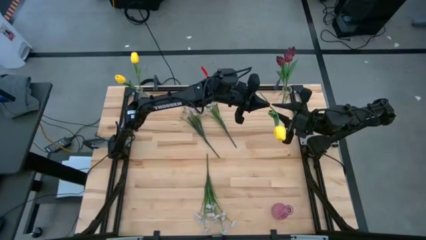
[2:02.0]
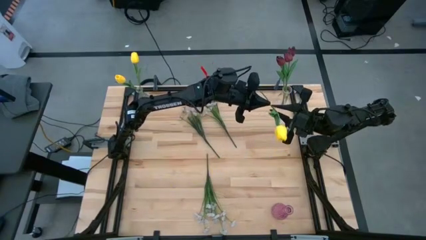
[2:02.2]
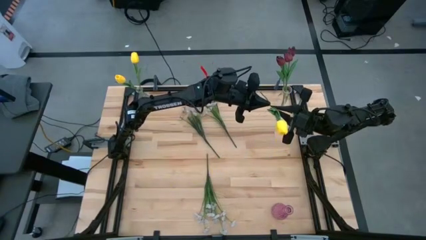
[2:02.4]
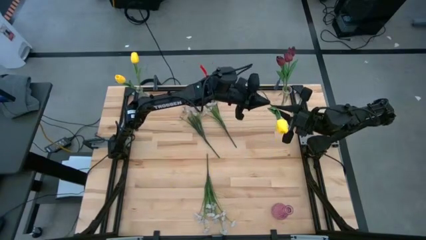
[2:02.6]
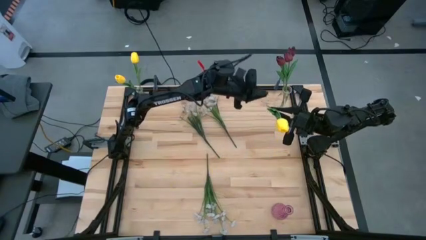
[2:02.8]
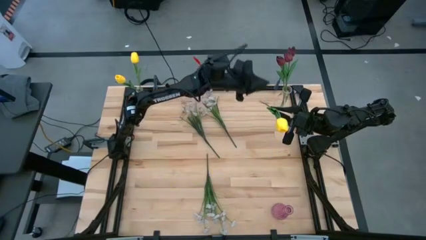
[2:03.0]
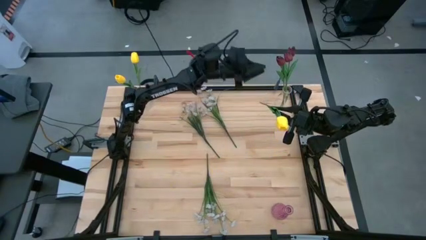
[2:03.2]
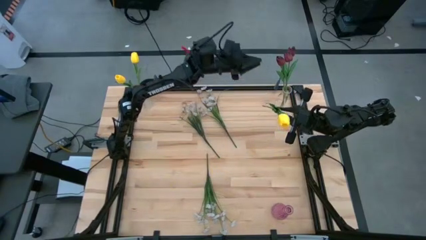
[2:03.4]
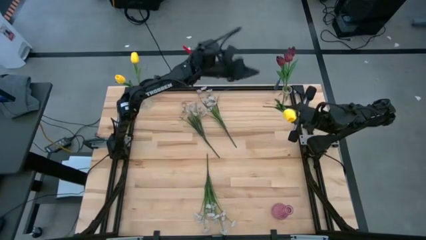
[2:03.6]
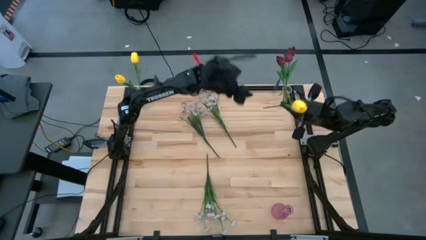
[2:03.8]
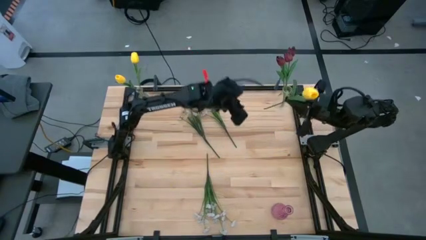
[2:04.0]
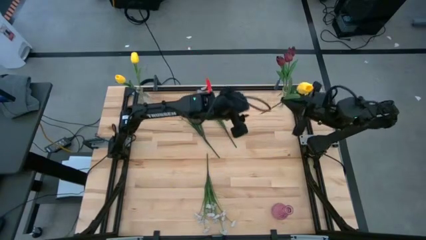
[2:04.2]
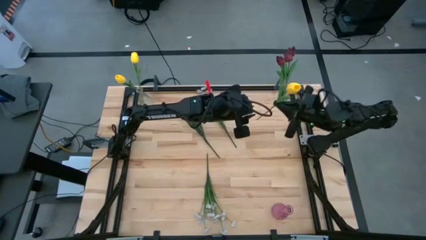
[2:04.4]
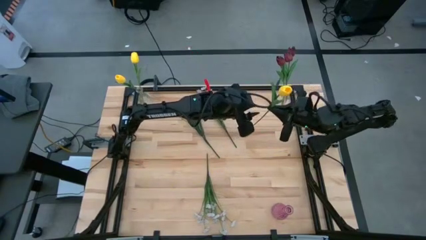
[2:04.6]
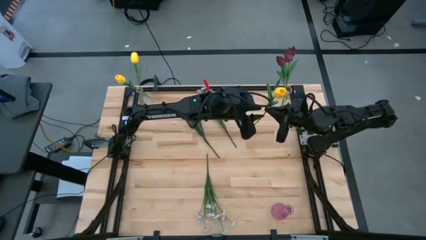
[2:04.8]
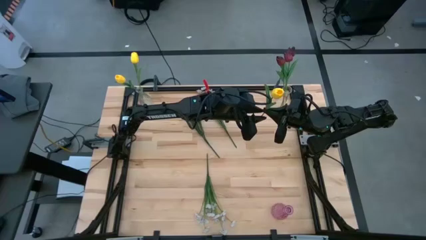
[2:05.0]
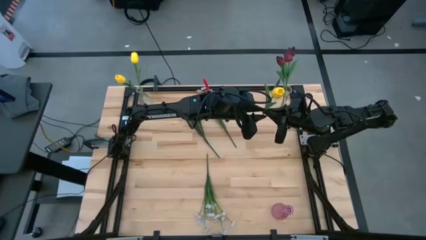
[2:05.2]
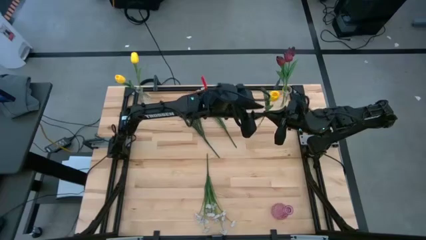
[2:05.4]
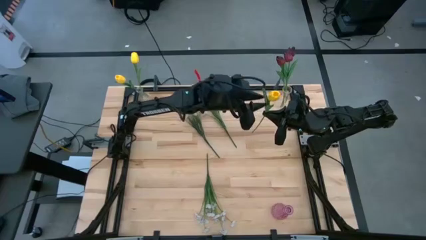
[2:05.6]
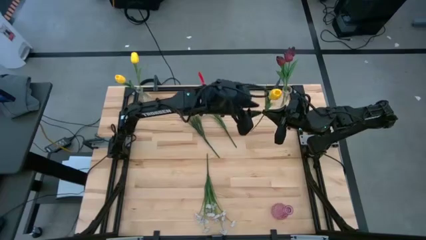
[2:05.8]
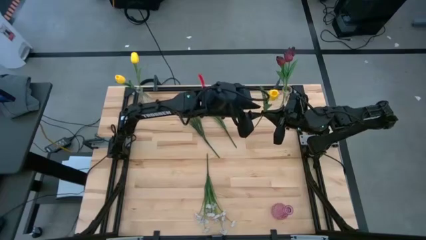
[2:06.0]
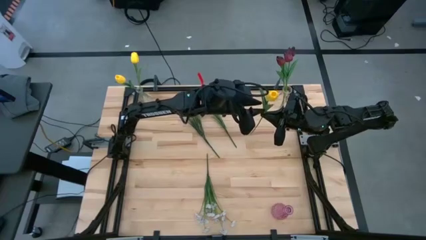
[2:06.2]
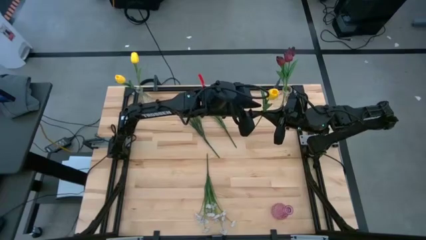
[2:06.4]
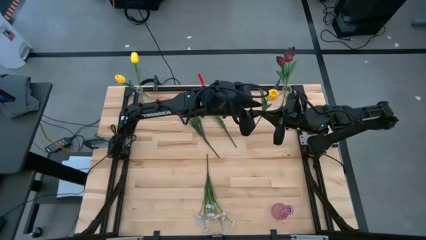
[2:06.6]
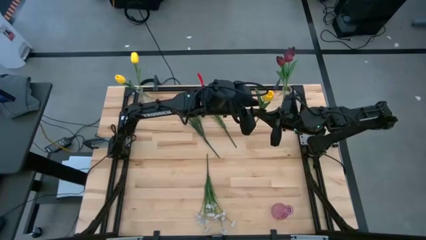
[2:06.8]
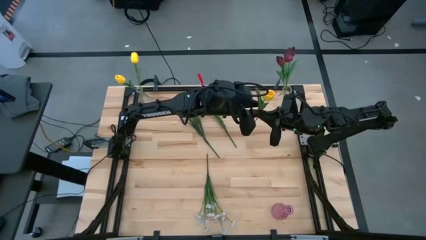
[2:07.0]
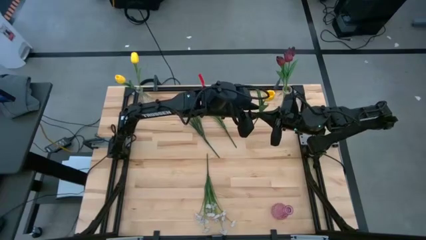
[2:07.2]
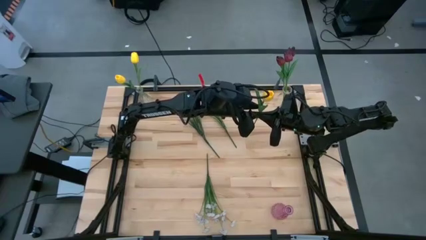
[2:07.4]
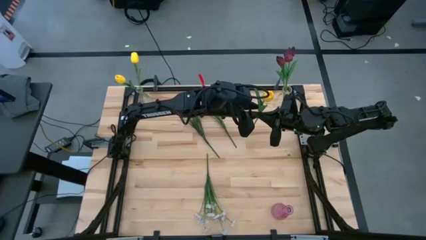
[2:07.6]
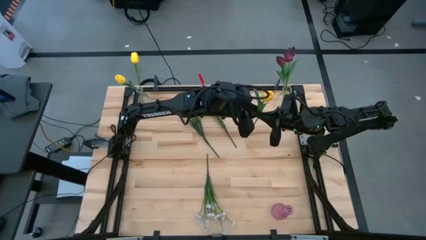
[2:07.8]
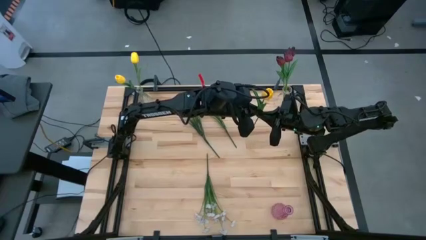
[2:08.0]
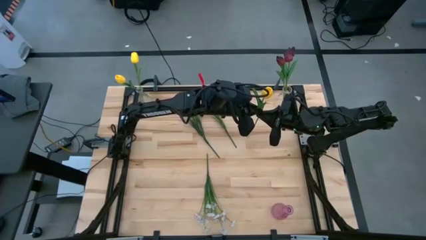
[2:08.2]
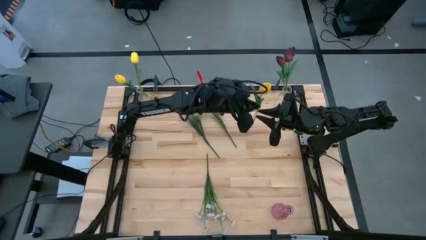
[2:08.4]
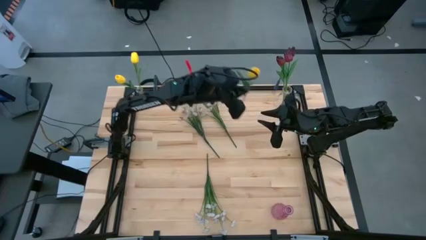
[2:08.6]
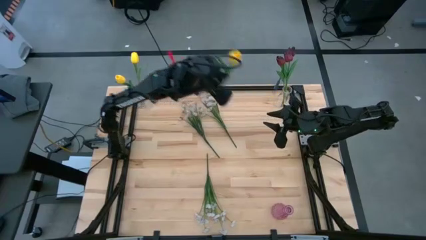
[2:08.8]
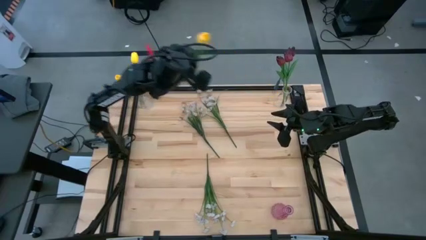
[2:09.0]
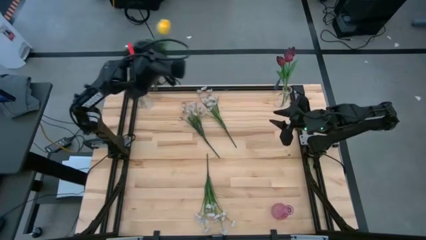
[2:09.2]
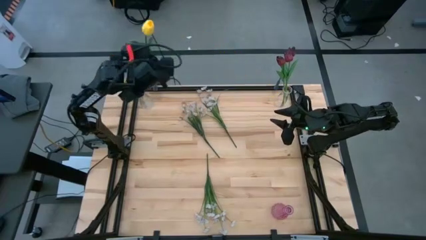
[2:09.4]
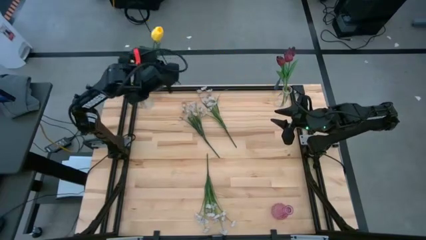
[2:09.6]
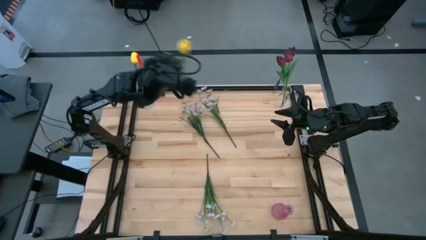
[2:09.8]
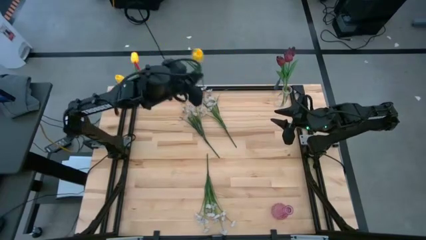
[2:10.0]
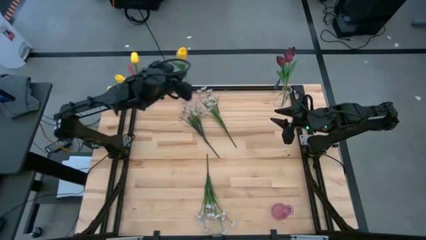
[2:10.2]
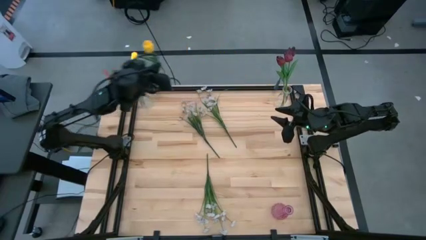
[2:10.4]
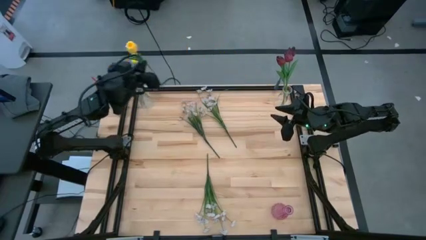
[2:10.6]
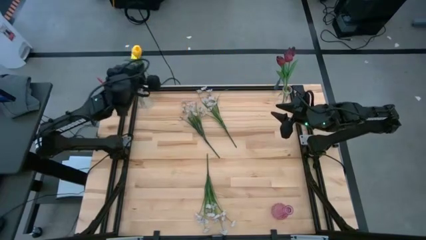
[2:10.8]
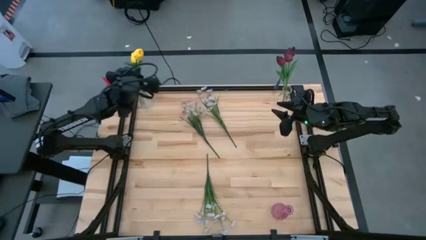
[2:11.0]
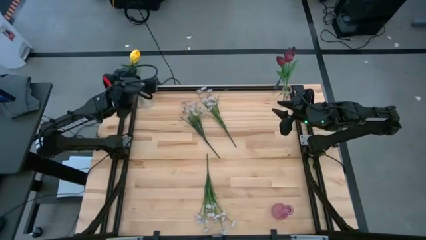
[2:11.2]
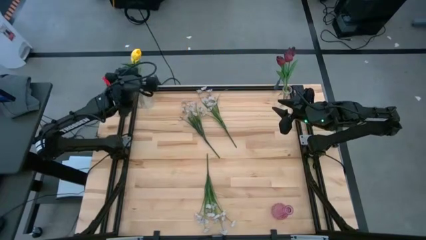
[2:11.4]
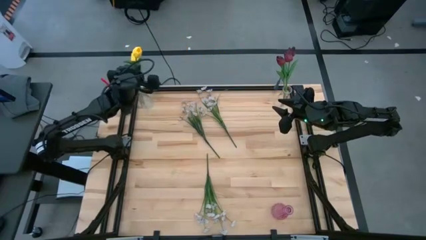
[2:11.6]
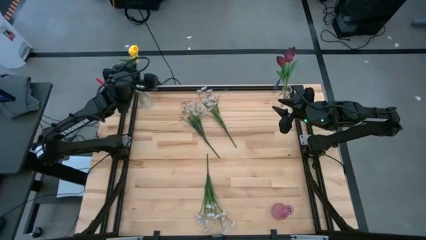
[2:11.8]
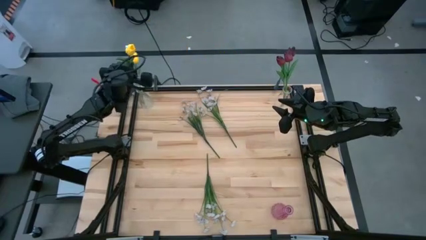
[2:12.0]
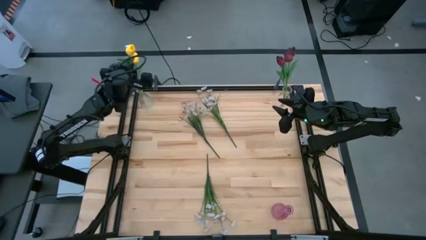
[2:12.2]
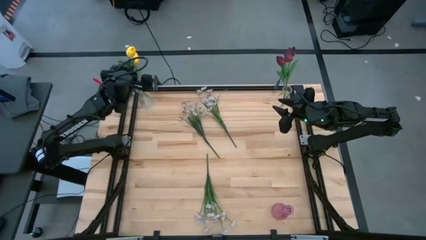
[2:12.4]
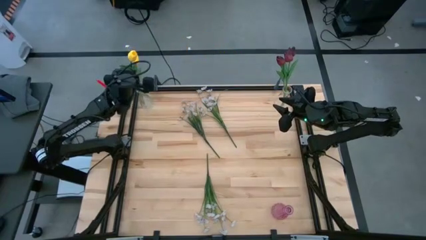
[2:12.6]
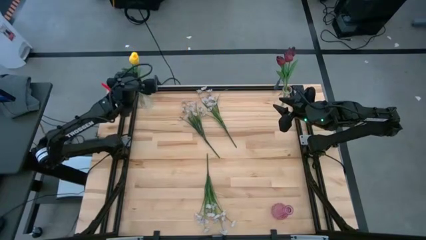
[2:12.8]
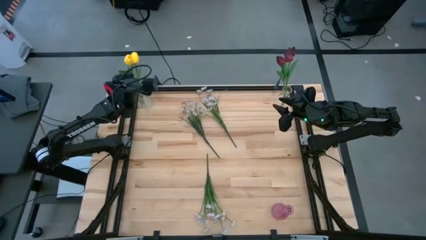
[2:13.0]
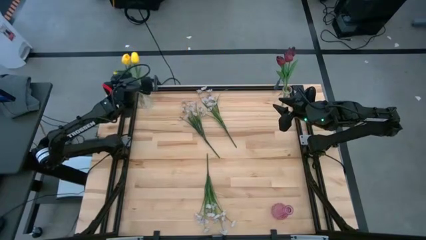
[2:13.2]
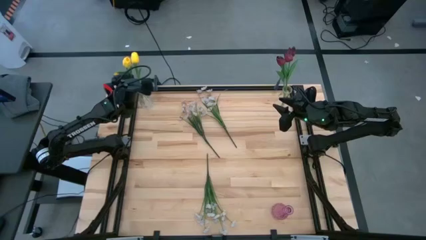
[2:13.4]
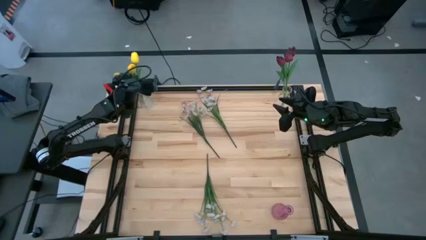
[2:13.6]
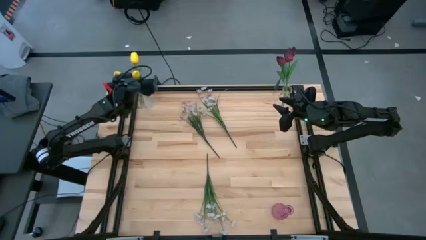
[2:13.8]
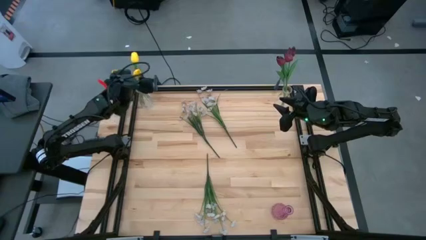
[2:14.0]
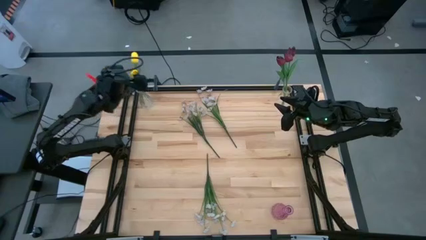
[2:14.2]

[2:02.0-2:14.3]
Task: Sort flowers into vase by color
Put the yellow flower into the left transparent vase
